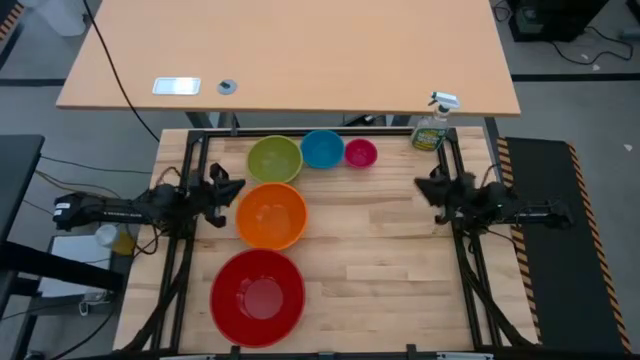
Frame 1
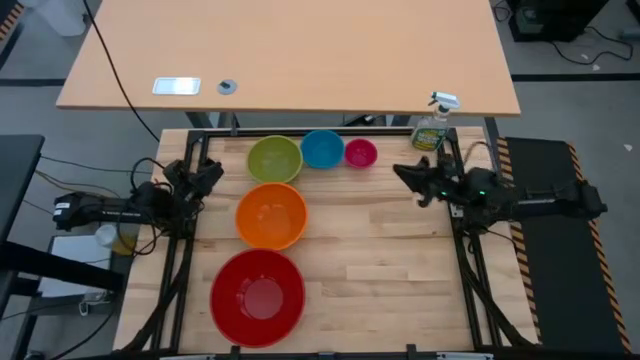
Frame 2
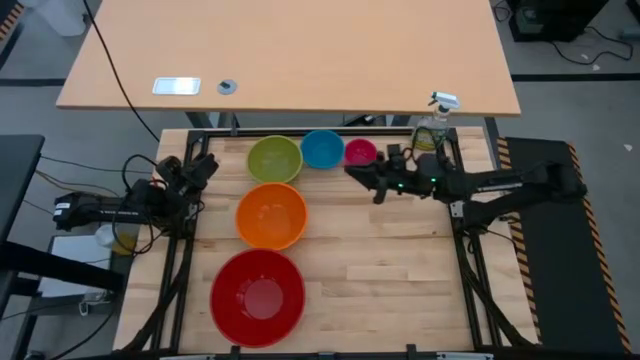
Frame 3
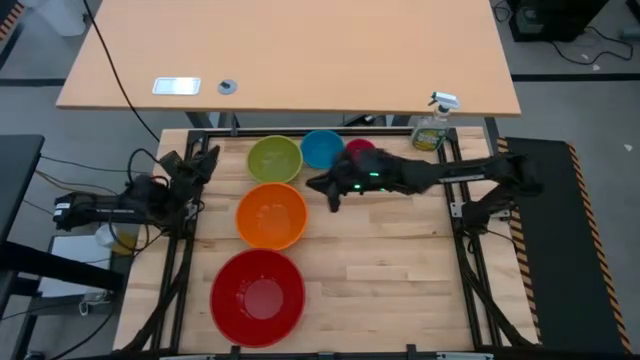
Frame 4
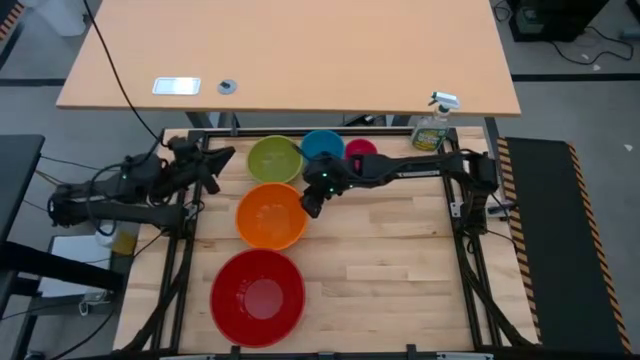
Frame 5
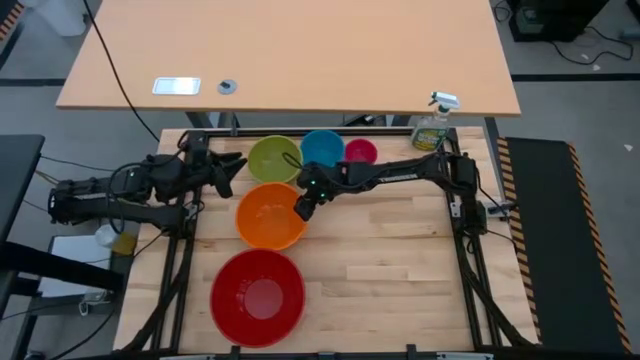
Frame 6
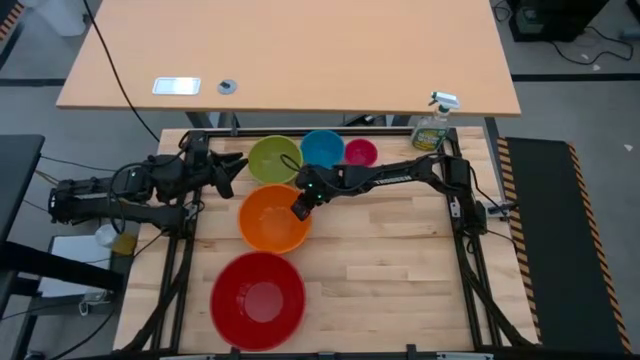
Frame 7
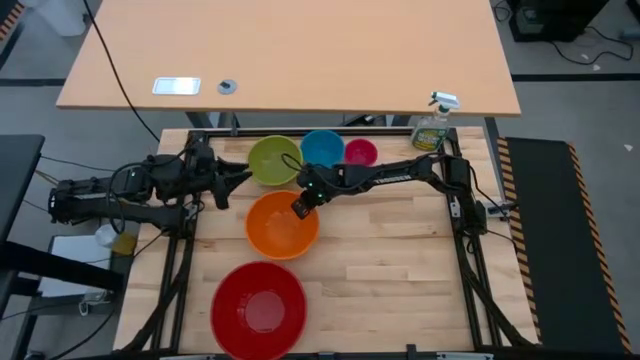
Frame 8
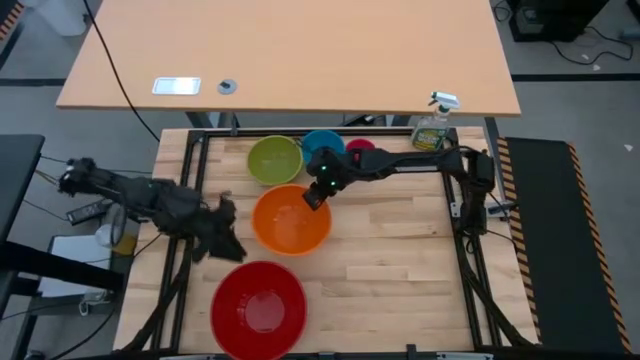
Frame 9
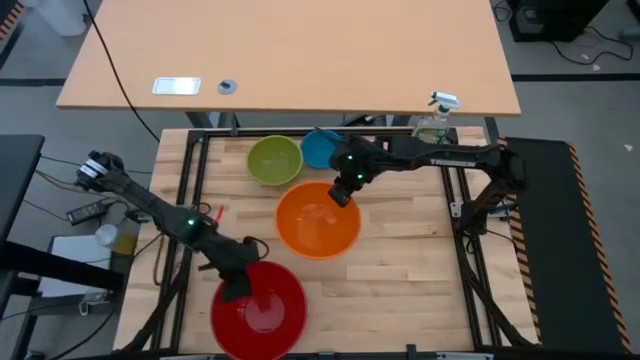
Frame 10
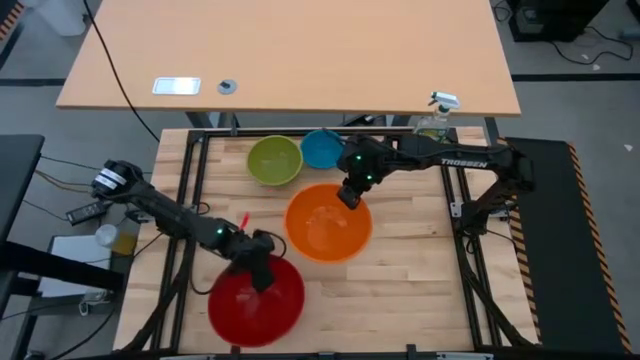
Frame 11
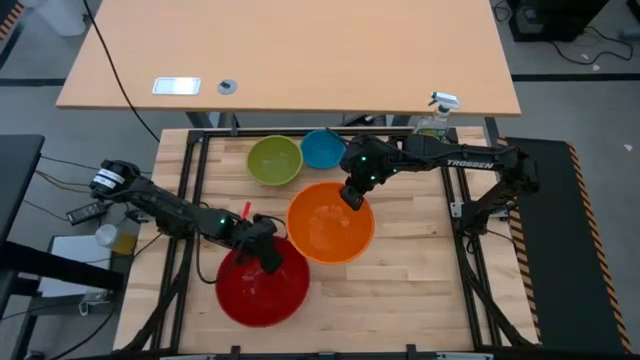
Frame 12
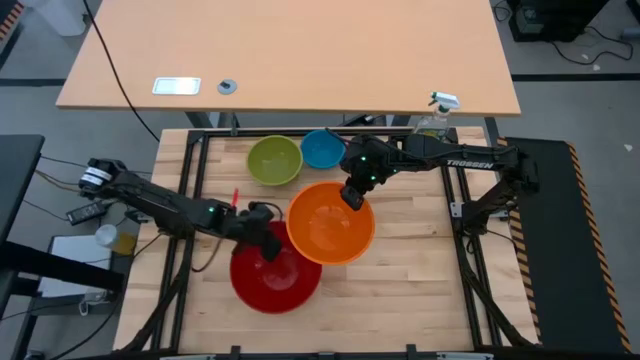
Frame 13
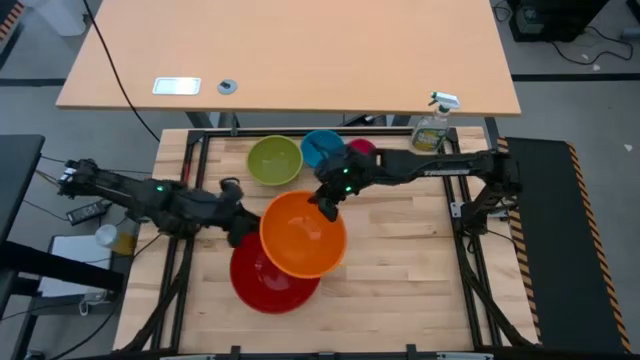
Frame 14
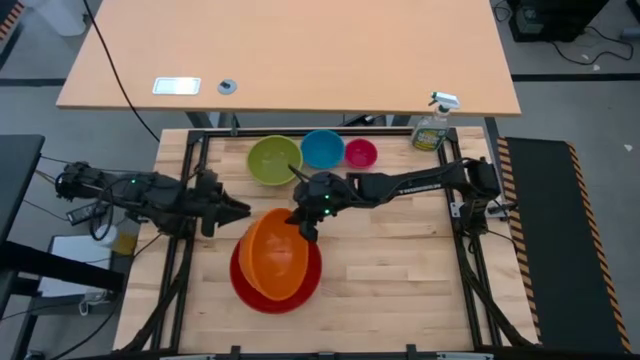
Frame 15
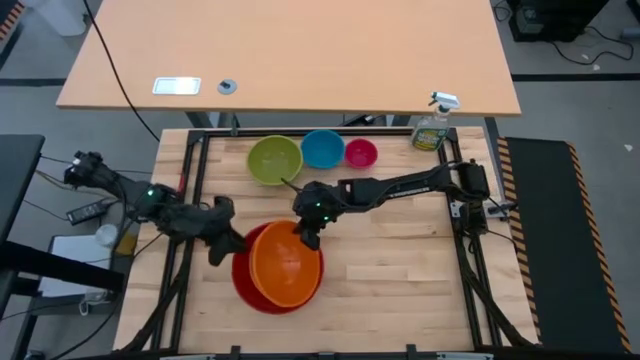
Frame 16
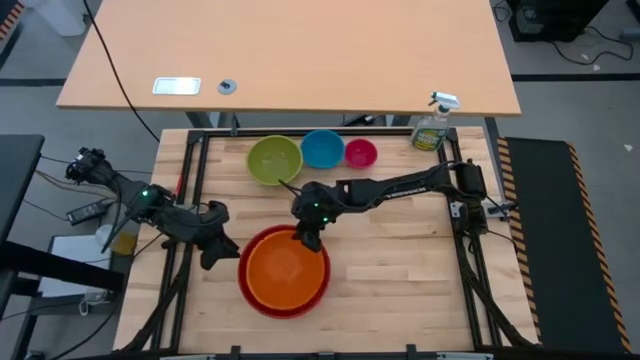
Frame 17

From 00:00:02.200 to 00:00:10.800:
Stack the orange bowl on top of the red bowl

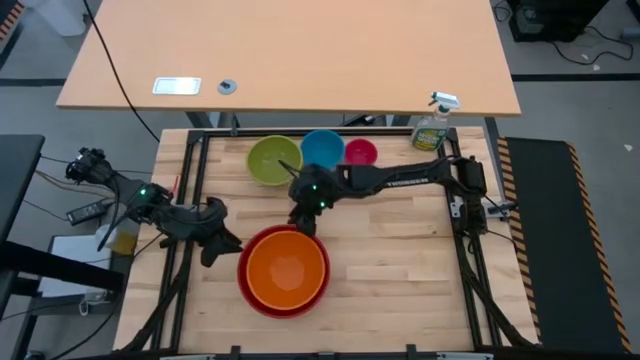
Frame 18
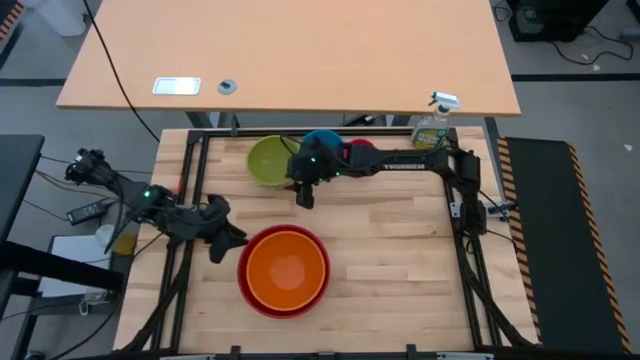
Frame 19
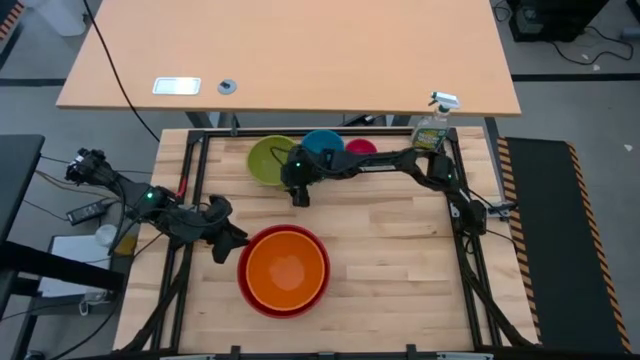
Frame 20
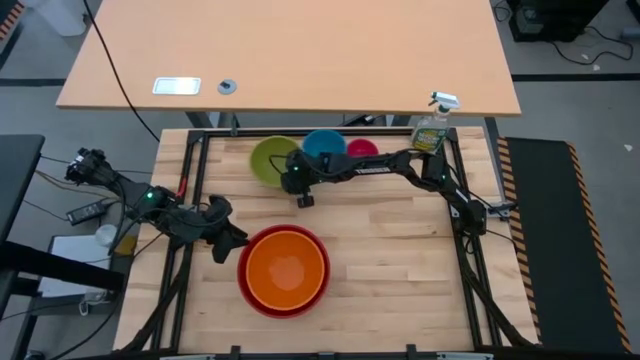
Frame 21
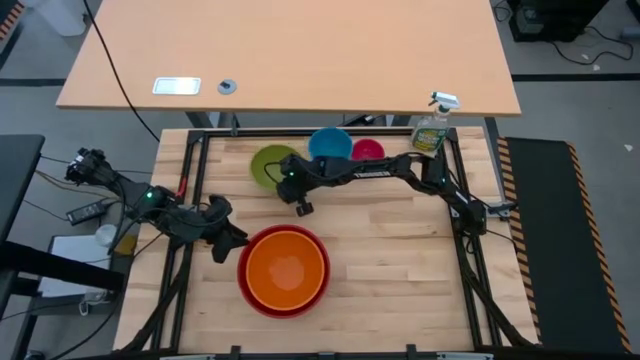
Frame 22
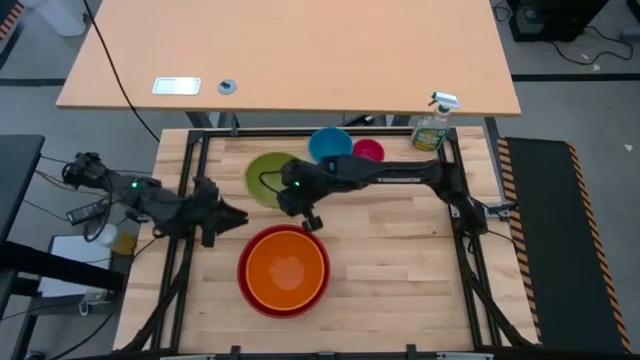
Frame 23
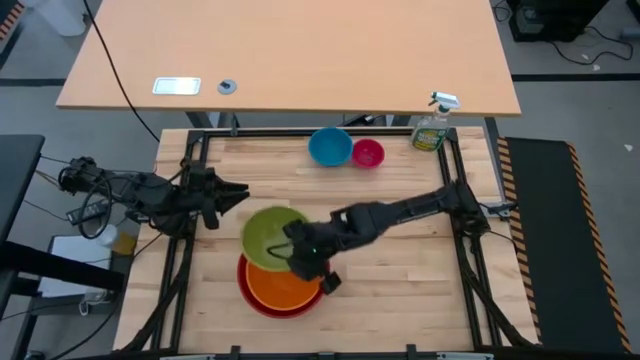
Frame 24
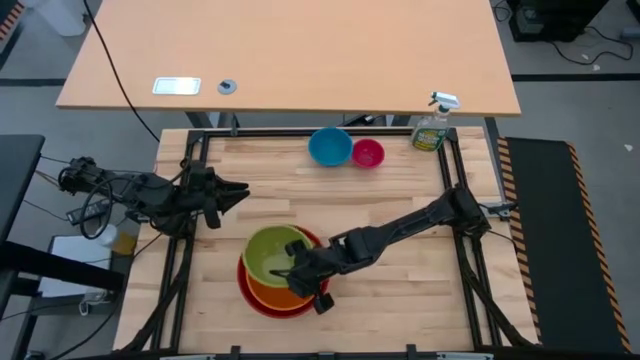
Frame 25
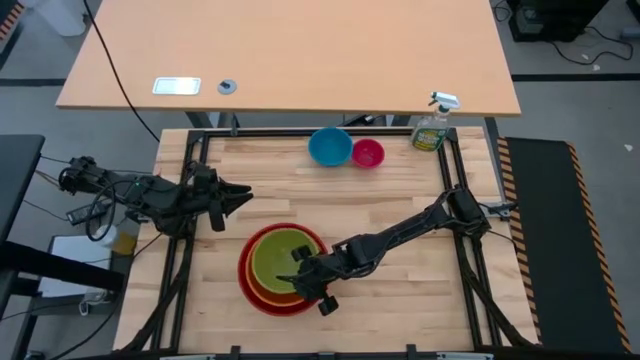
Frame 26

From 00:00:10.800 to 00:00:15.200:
Stack the green bowl on top of the orange bowl

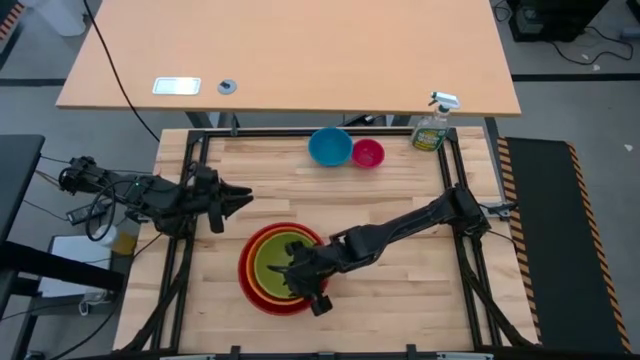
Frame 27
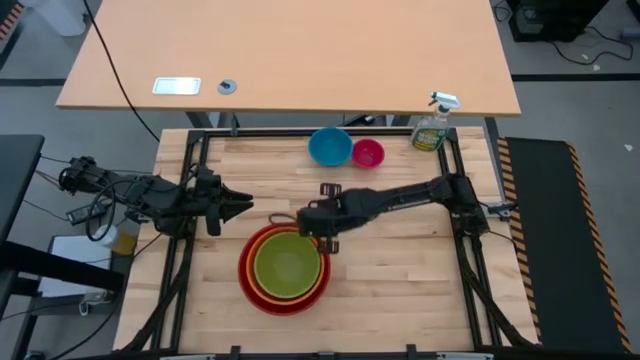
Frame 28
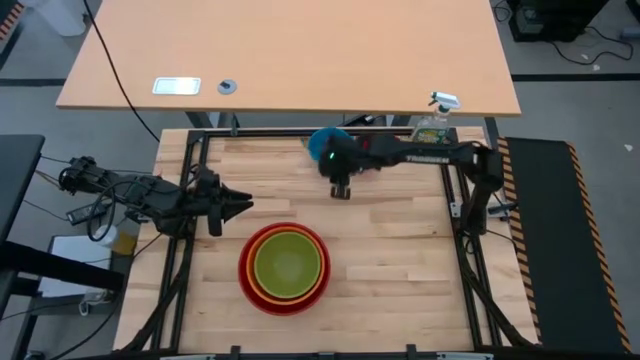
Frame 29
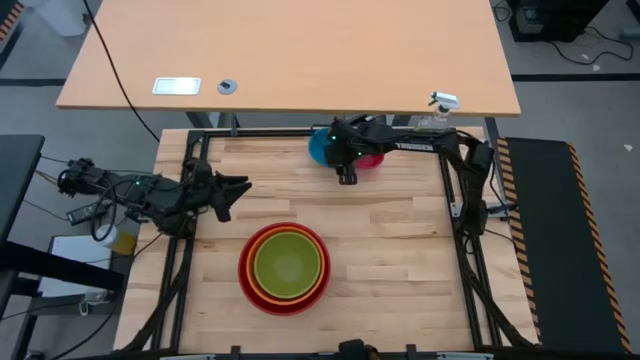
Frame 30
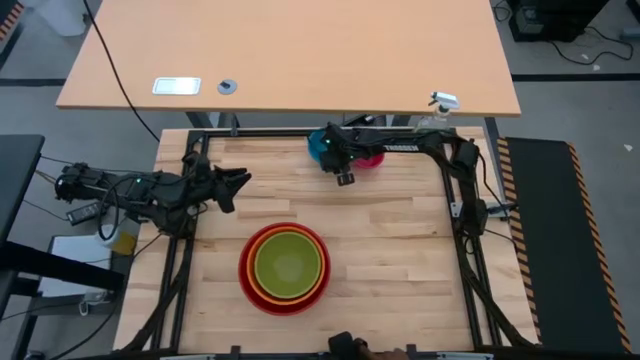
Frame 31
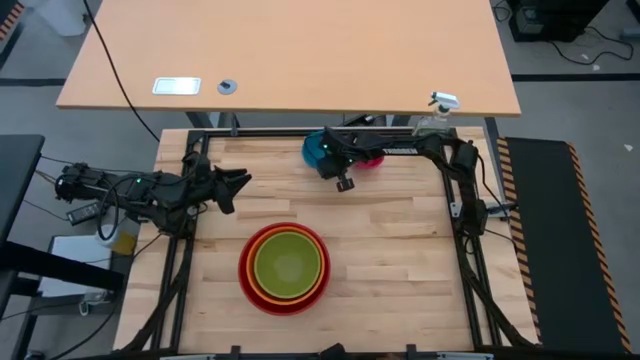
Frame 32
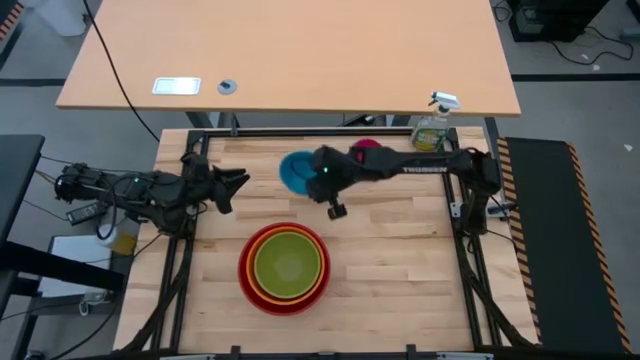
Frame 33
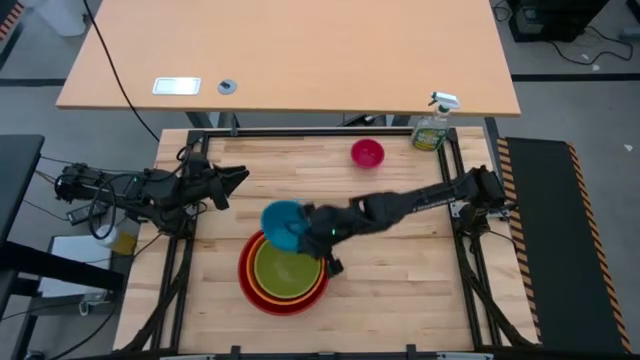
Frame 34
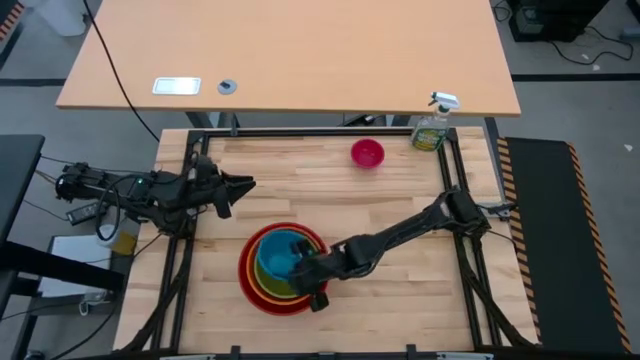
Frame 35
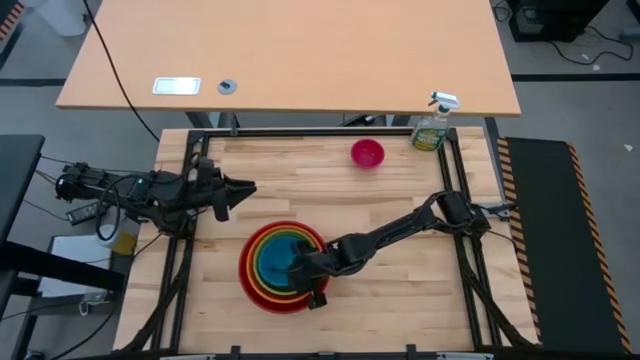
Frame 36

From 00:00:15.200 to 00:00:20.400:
Stack the blue bowl on top of the green bowl

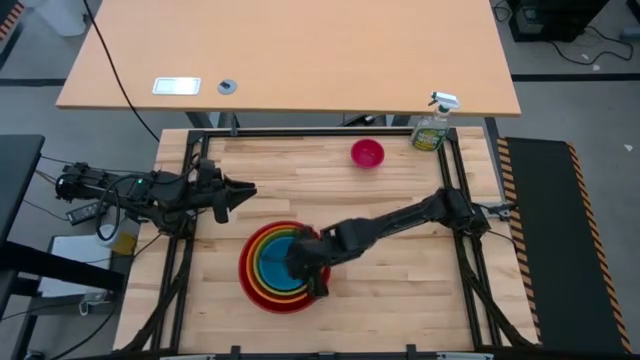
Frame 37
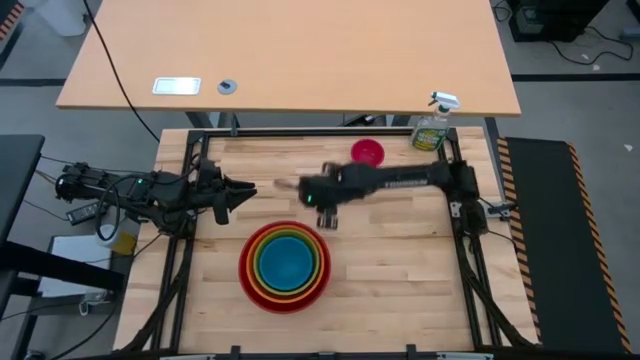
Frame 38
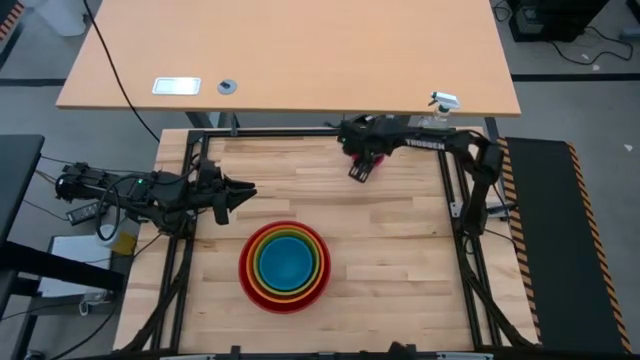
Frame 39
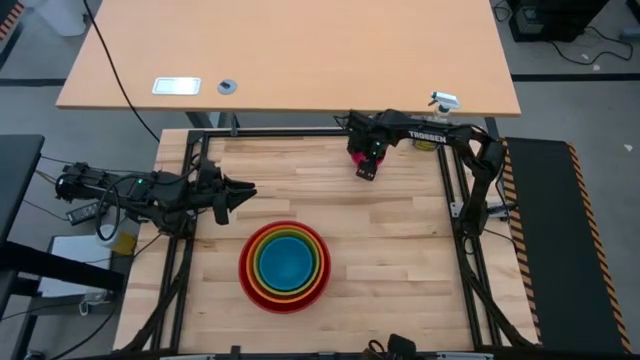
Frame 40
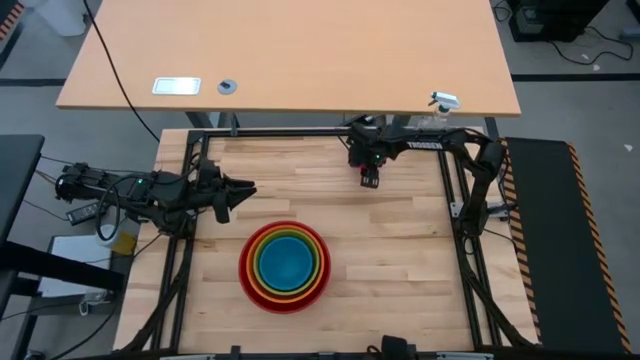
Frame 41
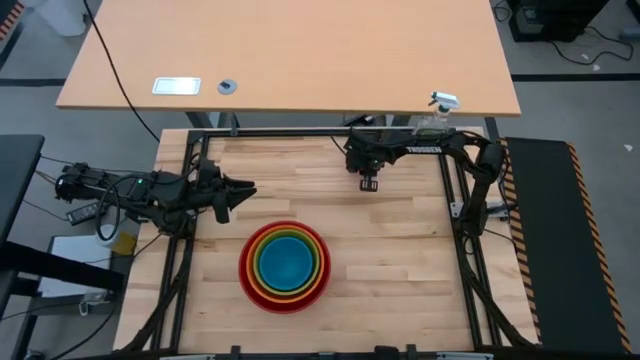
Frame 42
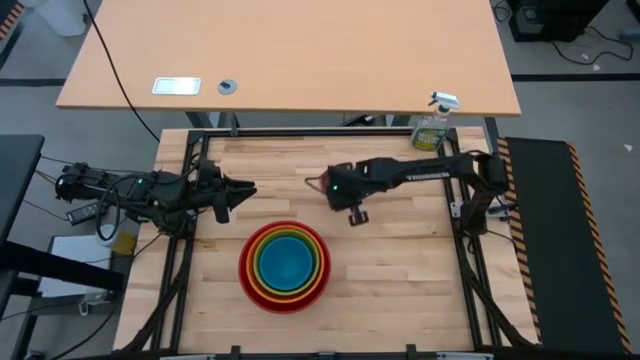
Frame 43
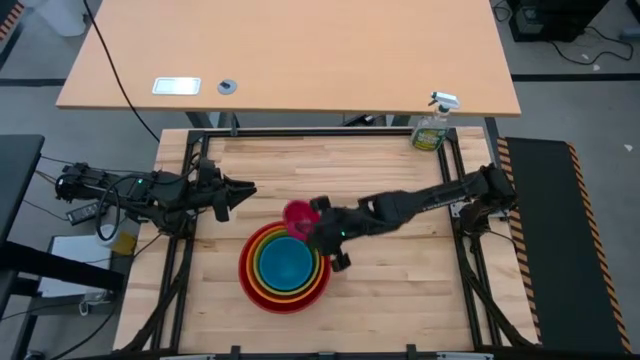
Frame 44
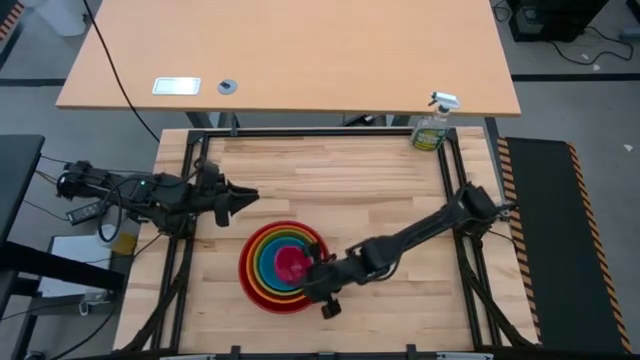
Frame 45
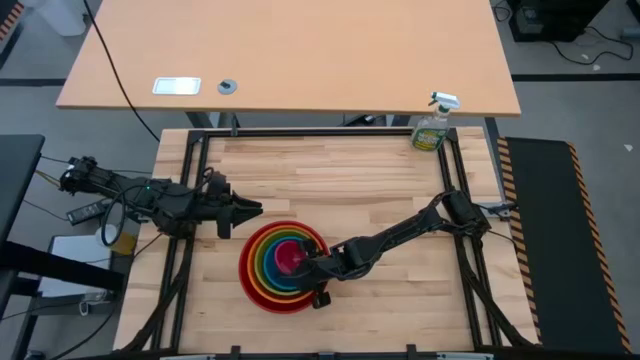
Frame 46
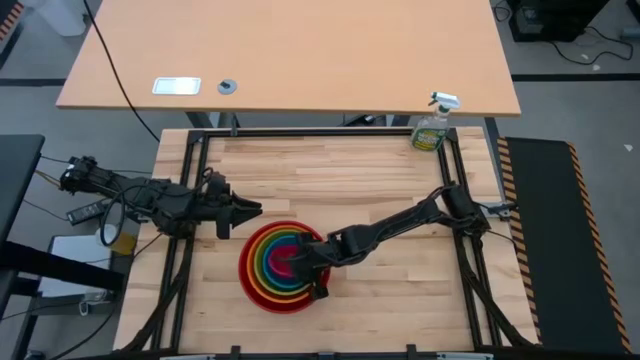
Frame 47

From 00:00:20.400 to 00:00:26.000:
Stack the pink bowl on top of the blue bowl
